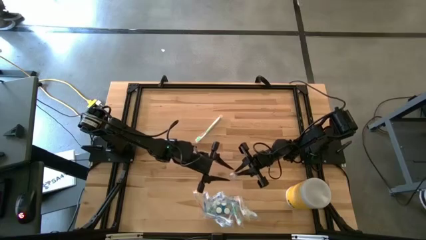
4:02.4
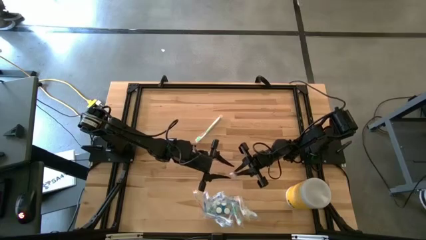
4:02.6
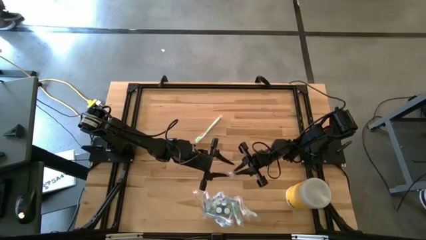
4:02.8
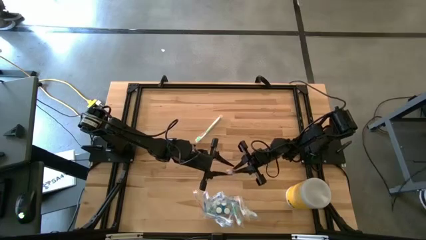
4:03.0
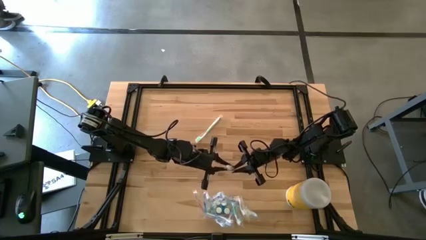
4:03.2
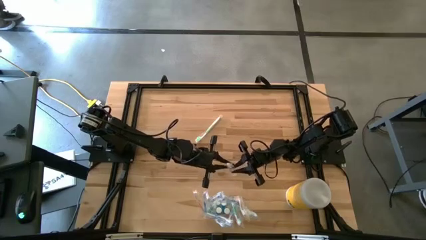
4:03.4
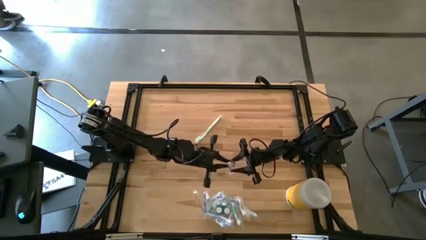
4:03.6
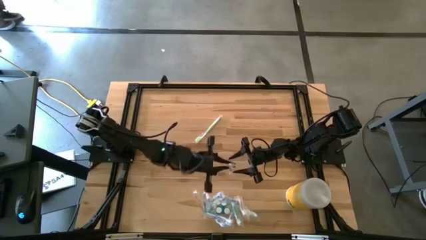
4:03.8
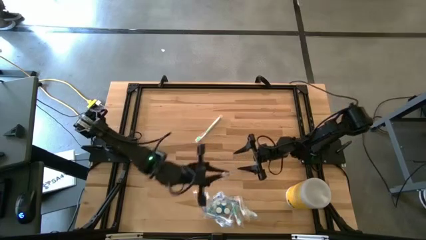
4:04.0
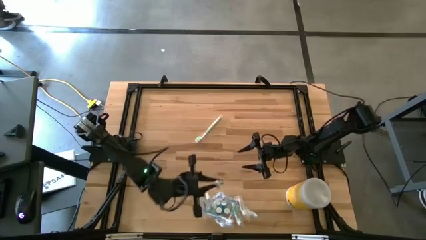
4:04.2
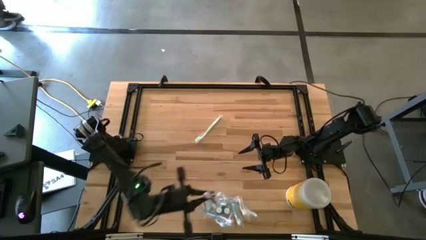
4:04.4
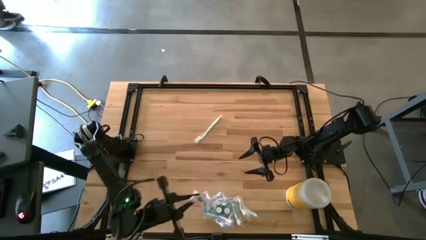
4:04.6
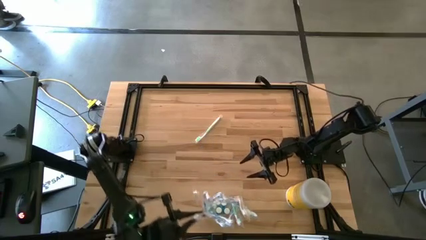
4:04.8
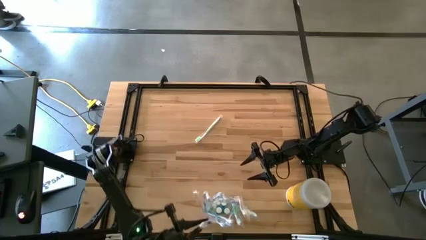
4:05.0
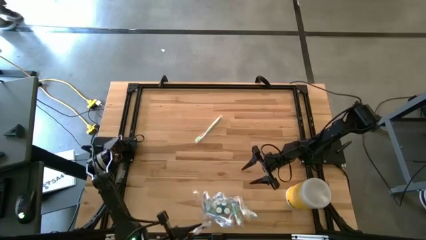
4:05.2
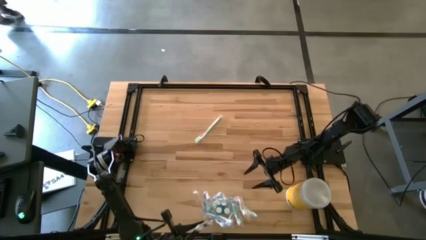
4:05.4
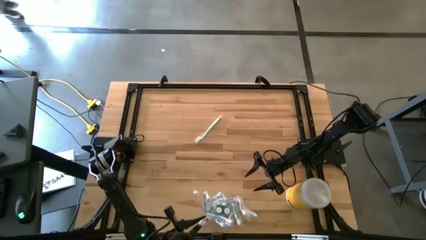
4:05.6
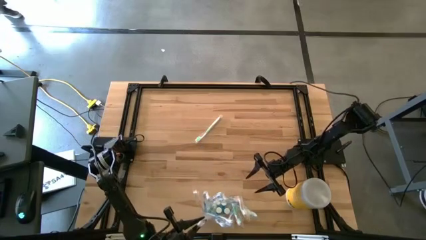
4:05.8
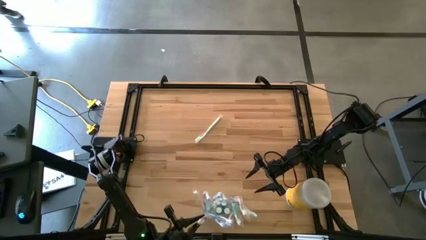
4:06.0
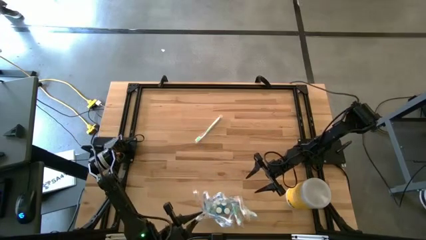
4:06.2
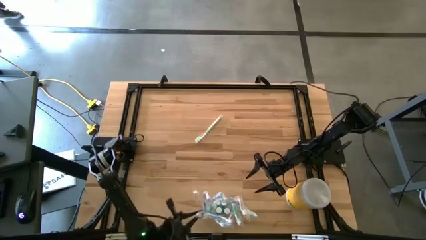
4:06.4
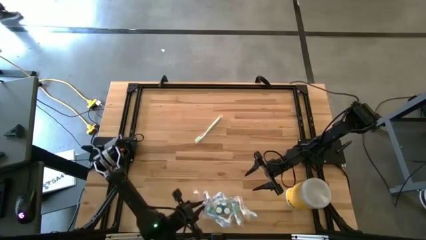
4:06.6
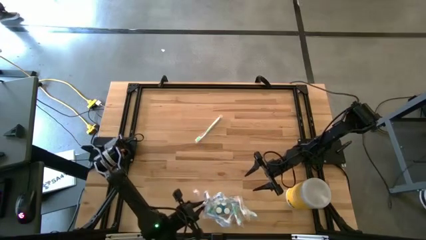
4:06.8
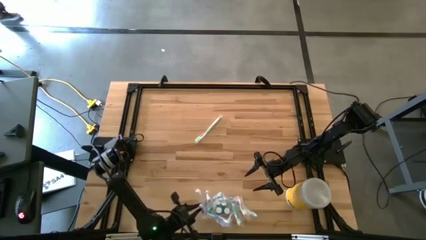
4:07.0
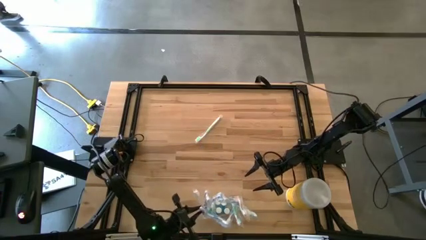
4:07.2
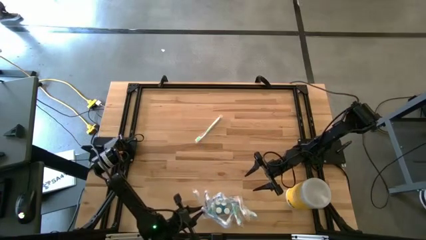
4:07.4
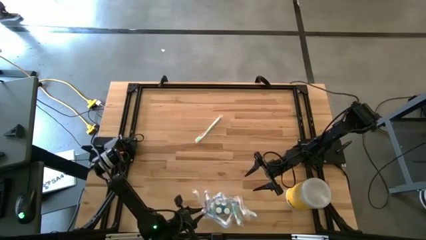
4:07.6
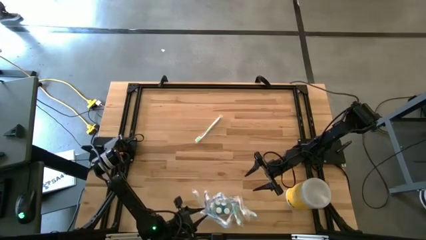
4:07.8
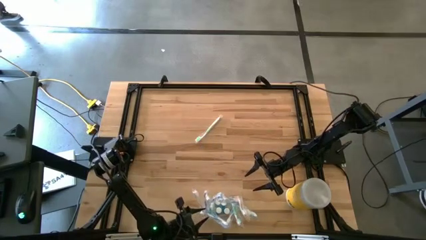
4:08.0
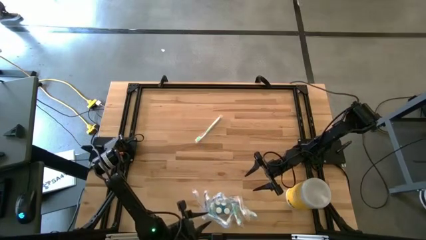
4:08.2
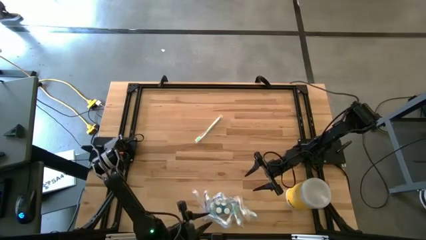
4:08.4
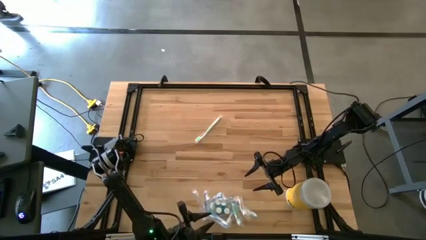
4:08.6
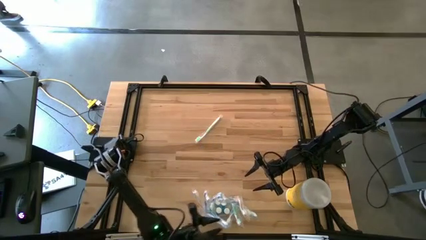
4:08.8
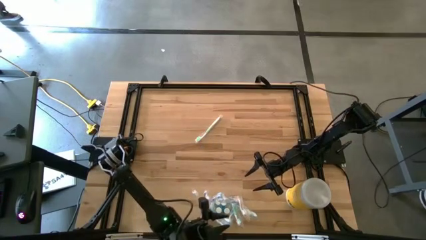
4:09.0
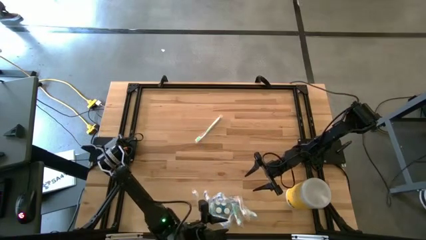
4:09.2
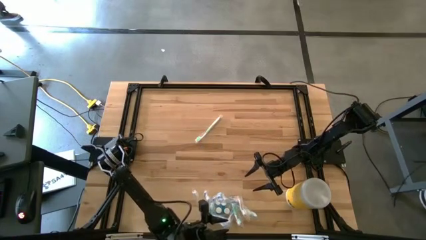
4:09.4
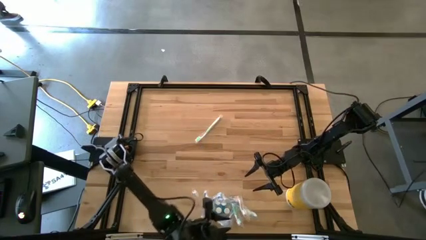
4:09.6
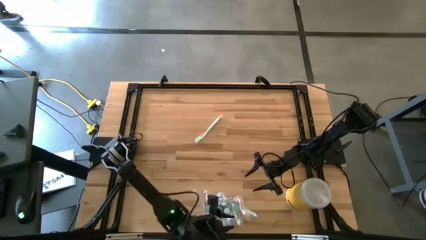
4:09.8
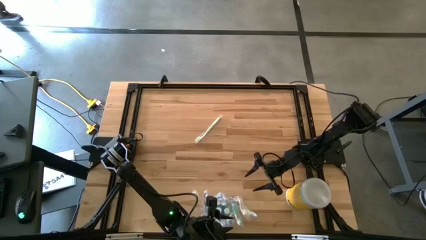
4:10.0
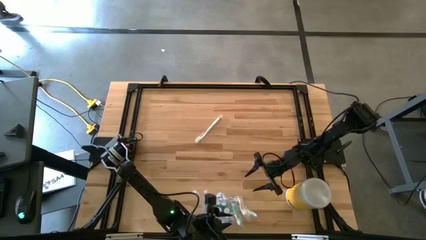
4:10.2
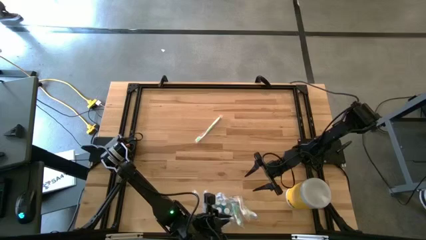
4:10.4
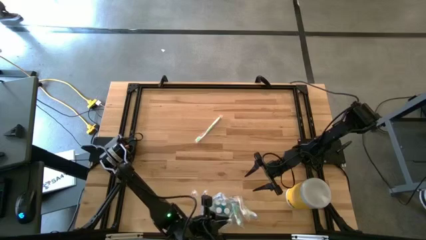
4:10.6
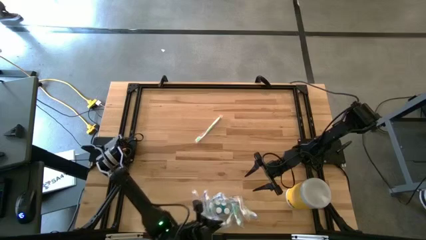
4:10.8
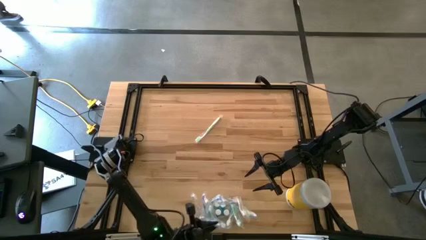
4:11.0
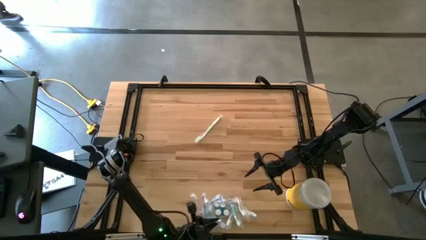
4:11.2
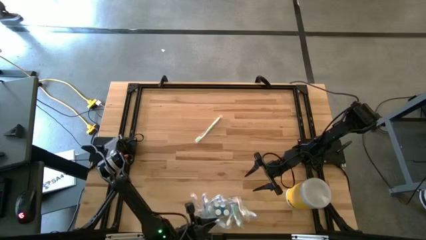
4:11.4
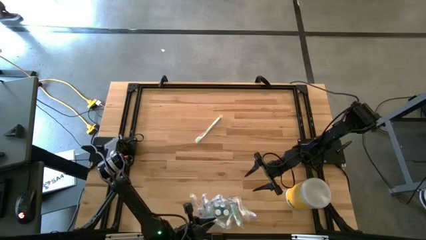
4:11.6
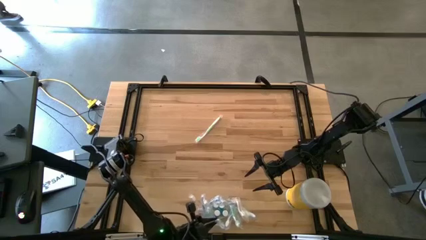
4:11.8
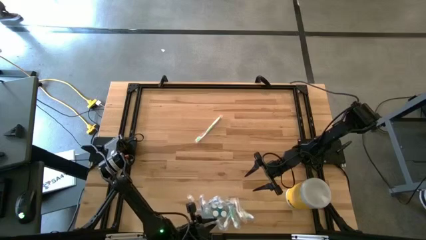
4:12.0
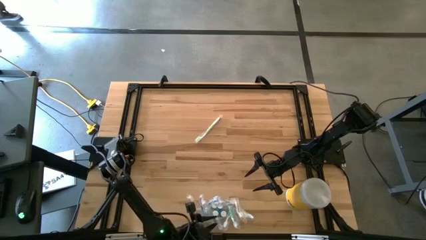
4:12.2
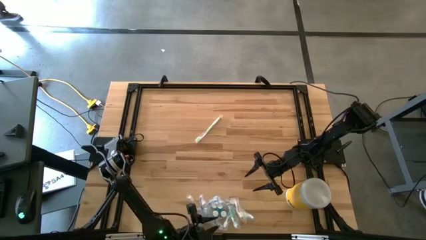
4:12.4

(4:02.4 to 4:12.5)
Task: Pick & Place toothbrushing station
Put the purple toothbrush into the transparent organizer

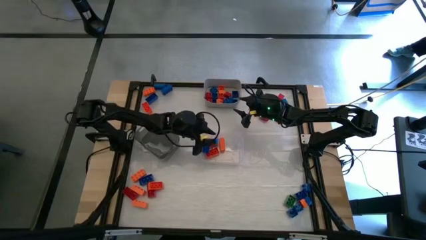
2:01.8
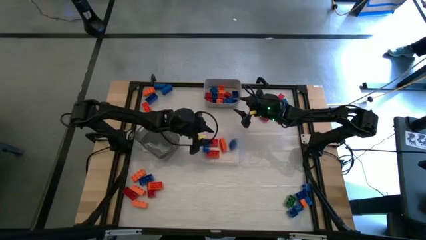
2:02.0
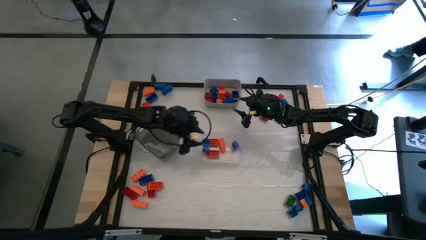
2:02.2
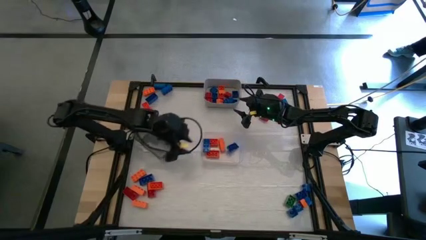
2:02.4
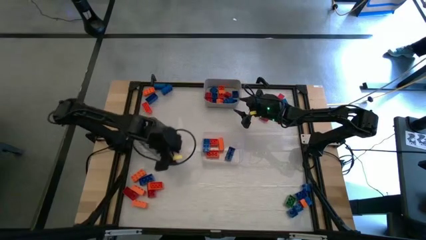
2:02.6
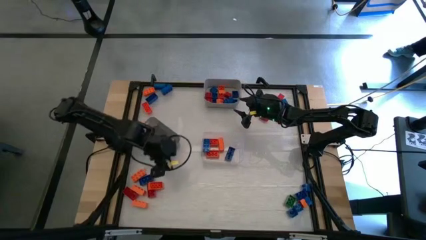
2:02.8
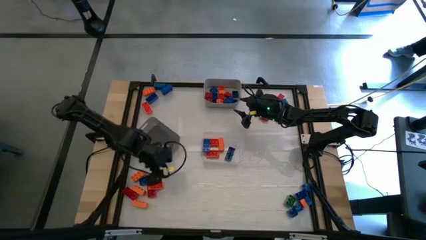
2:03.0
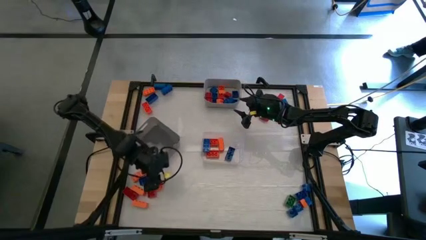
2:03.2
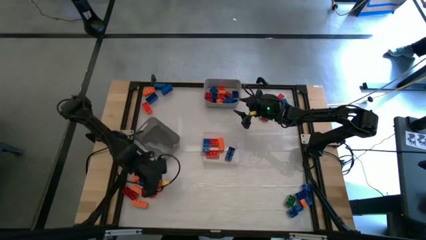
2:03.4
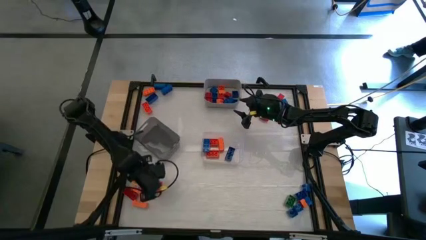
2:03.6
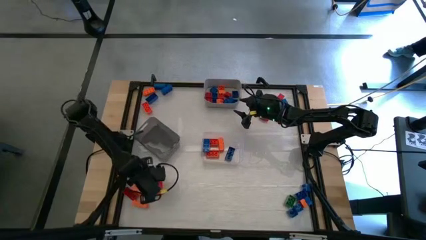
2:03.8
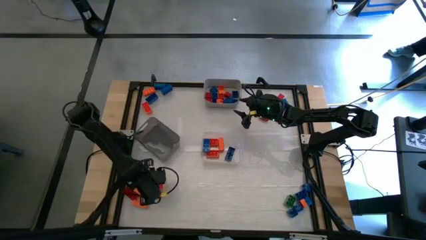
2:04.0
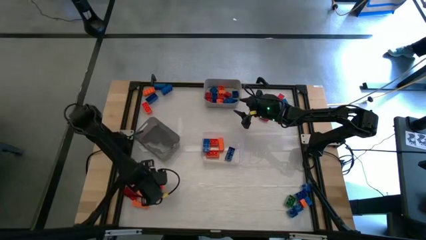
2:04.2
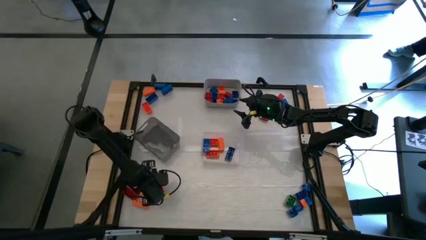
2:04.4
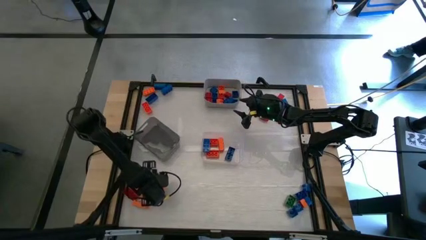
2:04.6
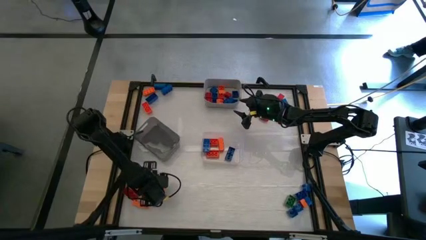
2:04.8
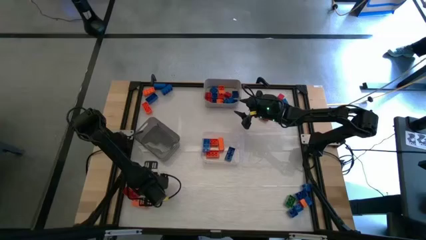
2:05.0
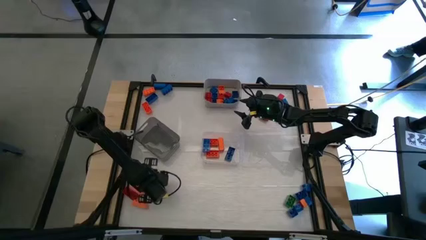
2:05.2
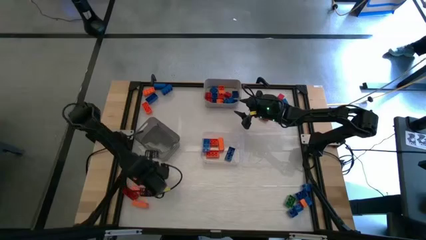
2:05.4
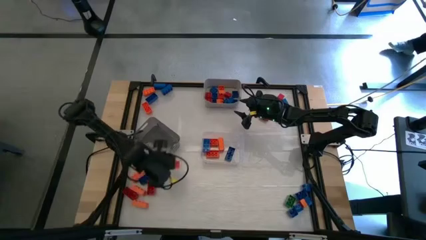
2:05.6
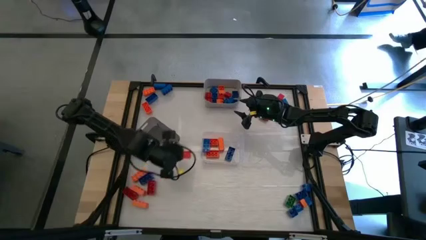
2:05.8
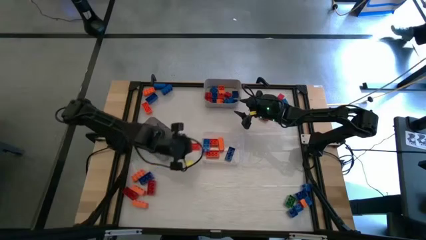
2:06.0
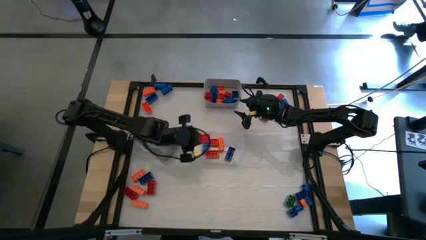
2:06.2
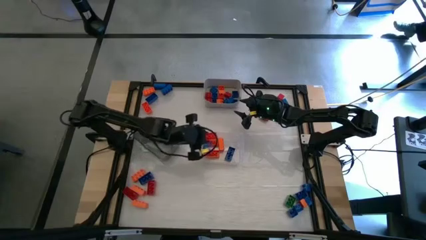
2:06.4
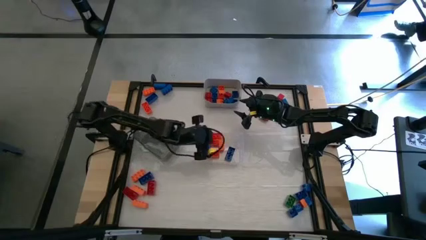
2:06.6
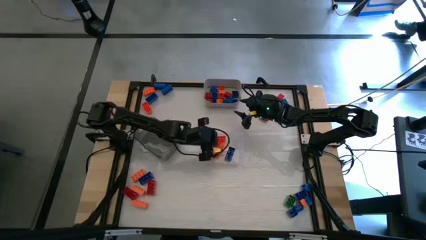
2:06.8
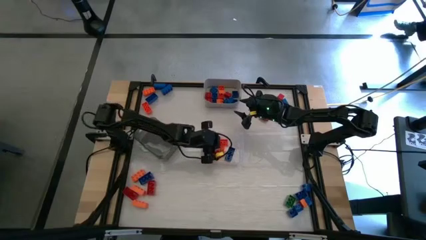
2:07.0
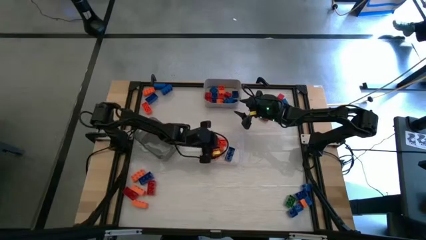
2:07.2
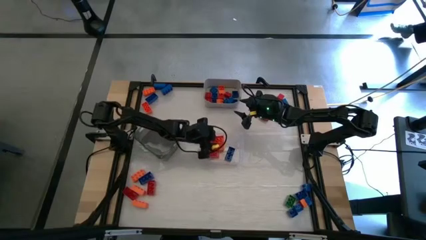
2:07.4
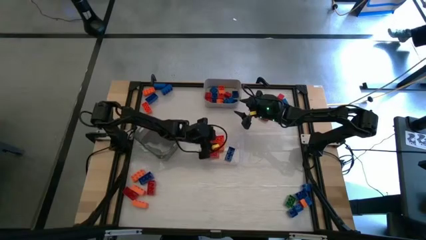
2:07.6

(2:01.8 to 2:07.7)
Task: Sort blocks by size
Put the big orange game piece into the transparent bin

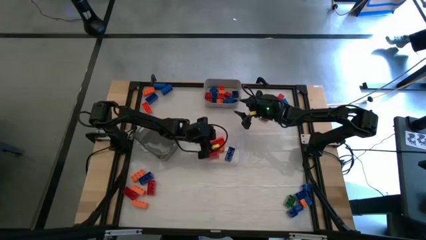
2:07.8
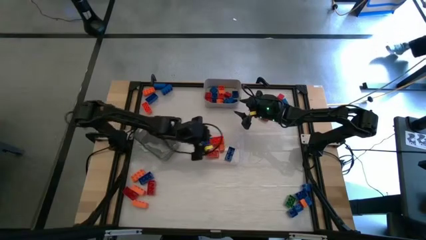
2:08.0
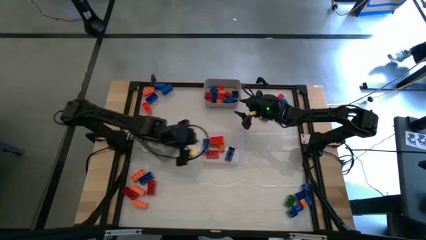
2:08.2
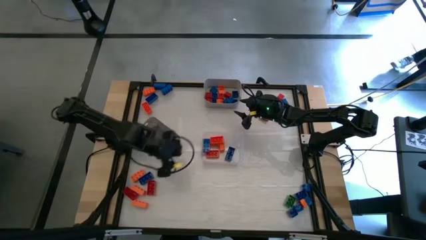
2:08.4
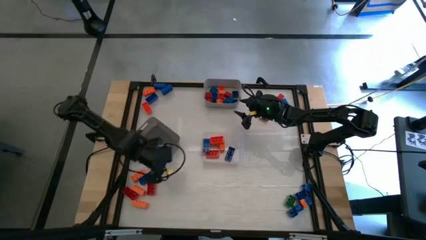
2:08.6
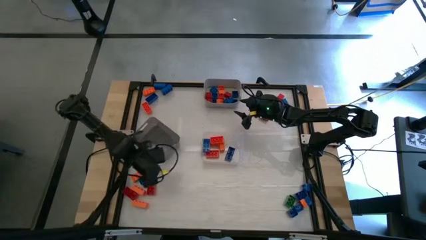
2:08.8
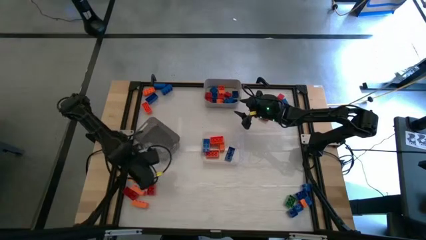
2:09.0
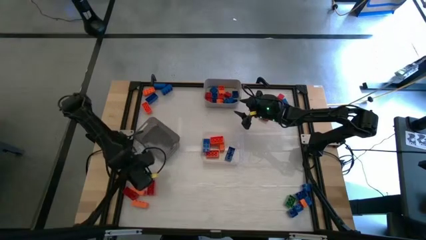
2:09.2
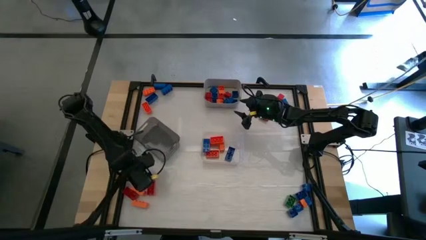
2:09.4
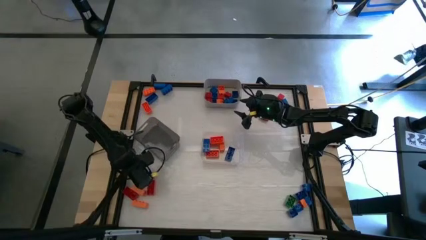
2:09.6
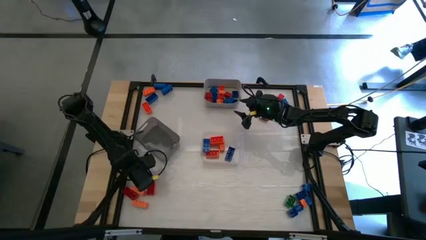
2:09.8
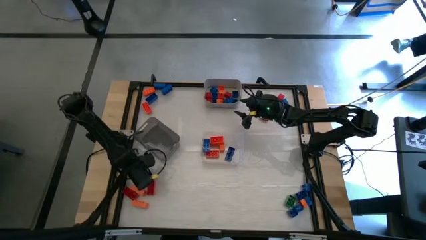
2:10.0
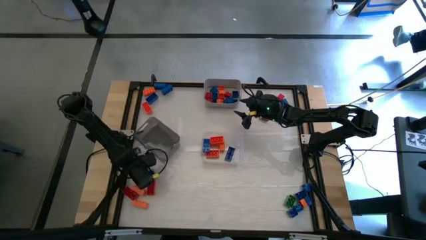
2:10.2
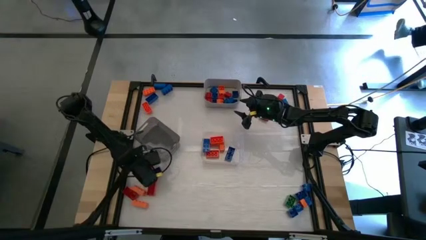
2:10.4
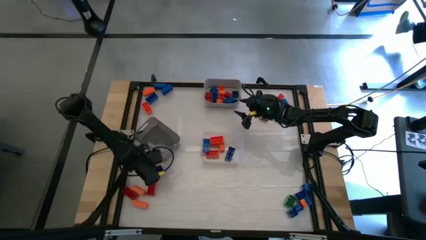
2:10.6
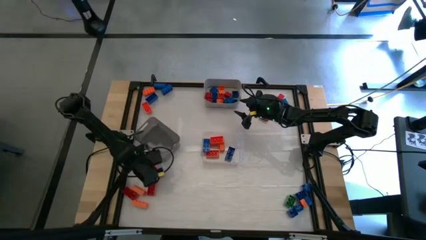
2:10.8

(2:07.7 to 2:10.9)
Put the blue game piece into the transparent bin
